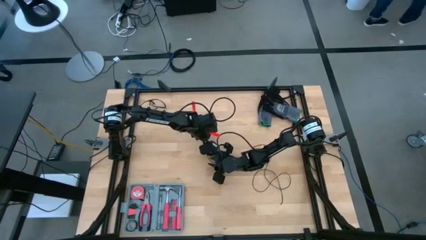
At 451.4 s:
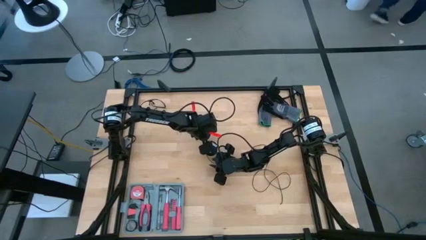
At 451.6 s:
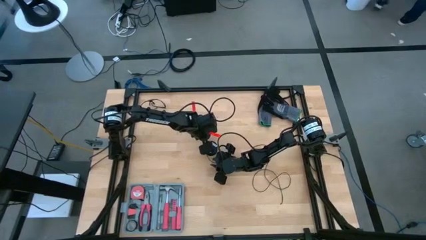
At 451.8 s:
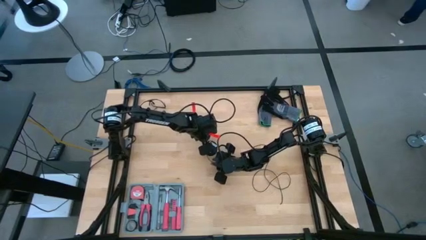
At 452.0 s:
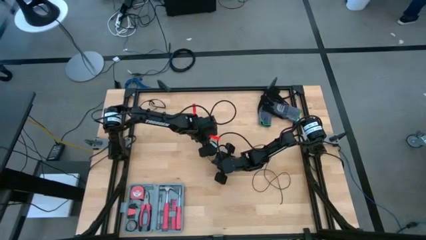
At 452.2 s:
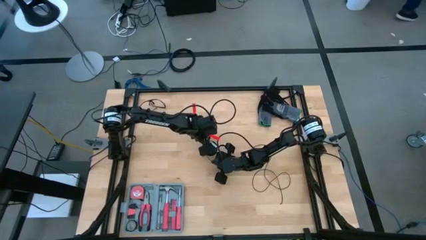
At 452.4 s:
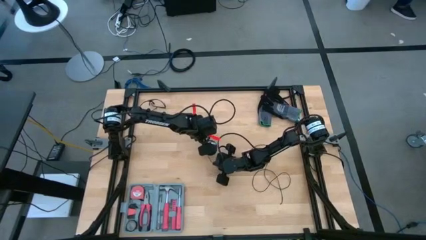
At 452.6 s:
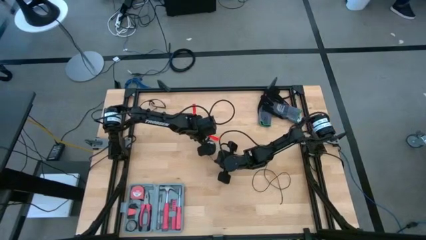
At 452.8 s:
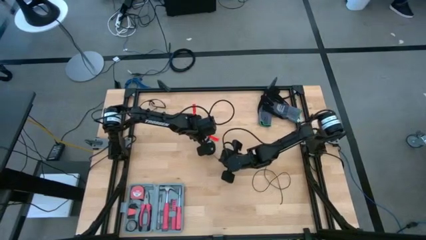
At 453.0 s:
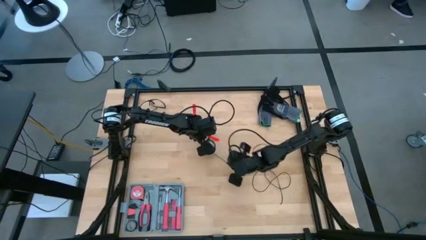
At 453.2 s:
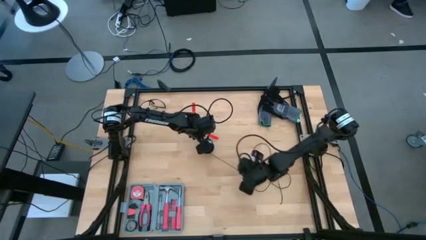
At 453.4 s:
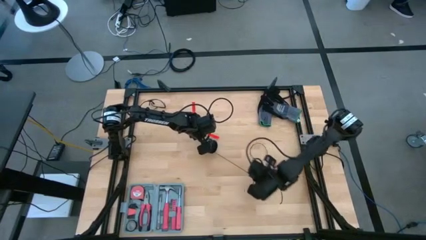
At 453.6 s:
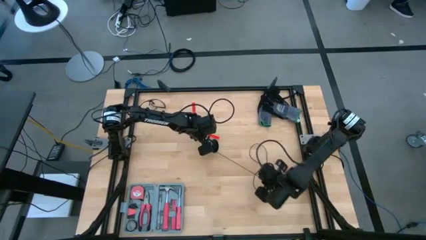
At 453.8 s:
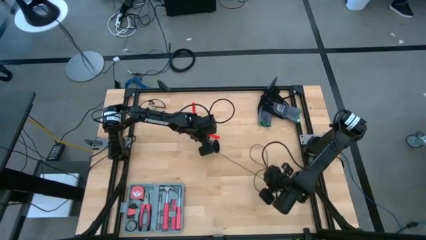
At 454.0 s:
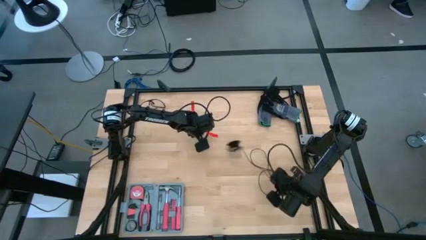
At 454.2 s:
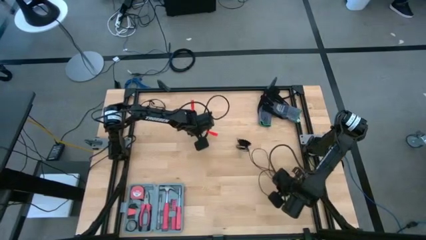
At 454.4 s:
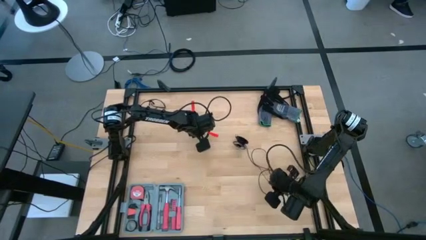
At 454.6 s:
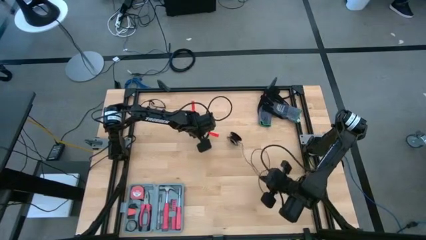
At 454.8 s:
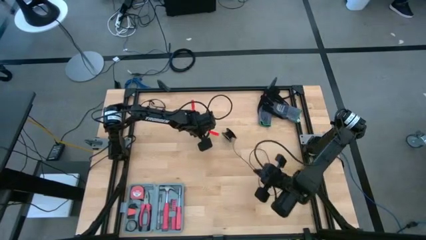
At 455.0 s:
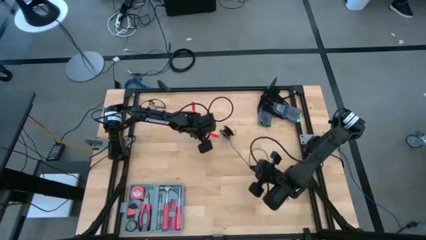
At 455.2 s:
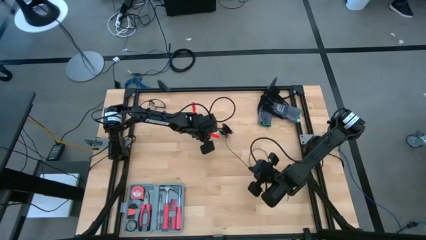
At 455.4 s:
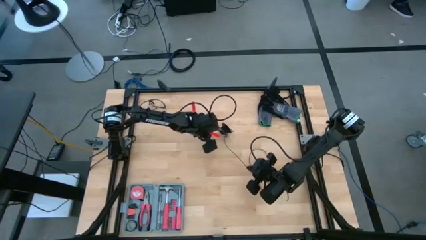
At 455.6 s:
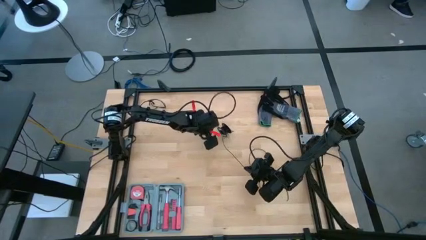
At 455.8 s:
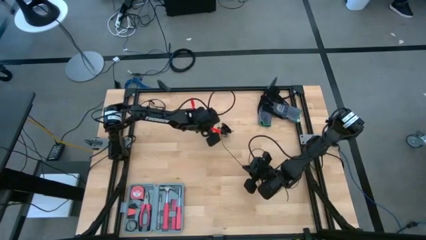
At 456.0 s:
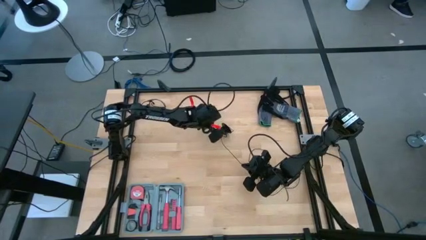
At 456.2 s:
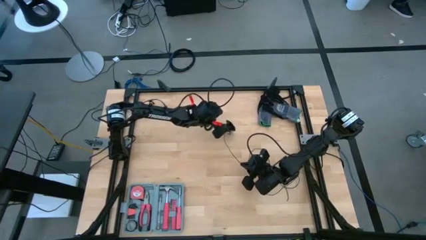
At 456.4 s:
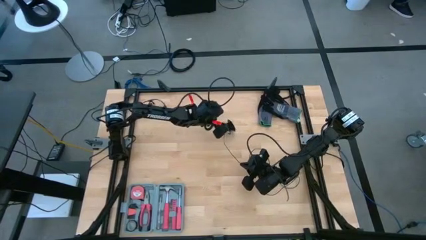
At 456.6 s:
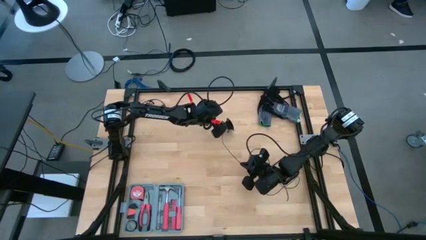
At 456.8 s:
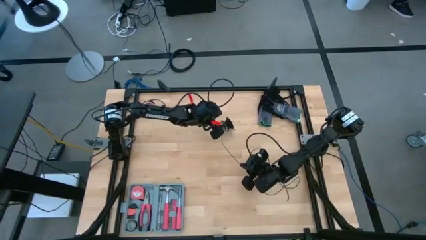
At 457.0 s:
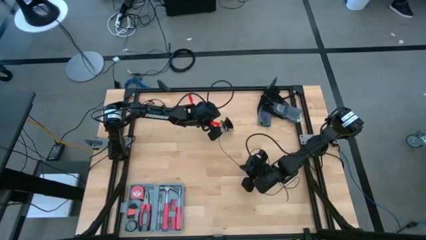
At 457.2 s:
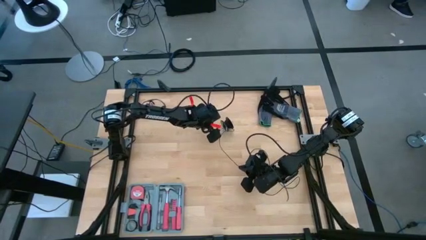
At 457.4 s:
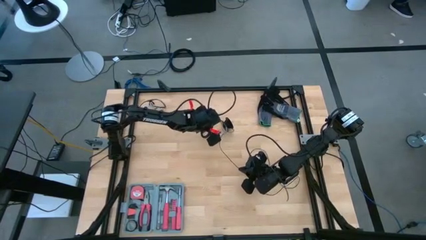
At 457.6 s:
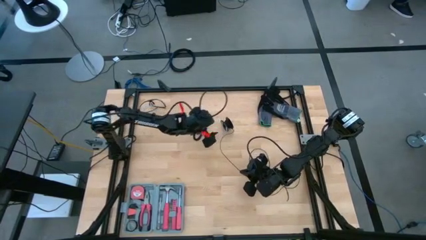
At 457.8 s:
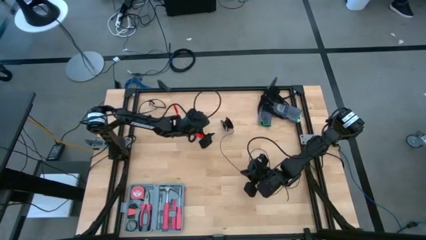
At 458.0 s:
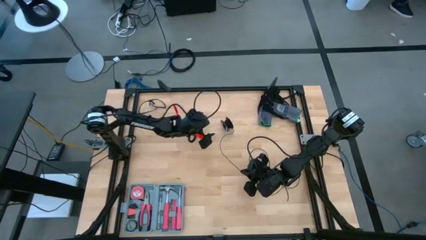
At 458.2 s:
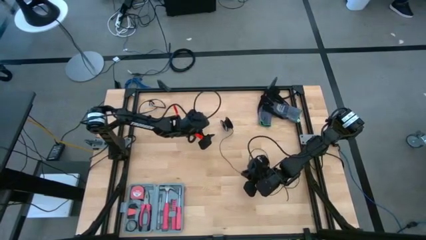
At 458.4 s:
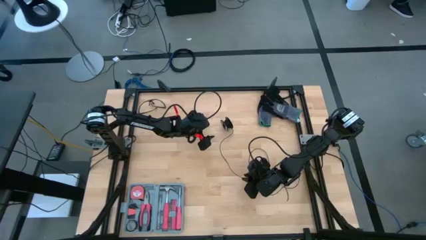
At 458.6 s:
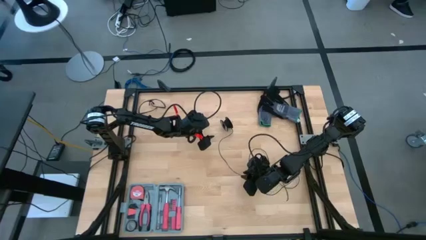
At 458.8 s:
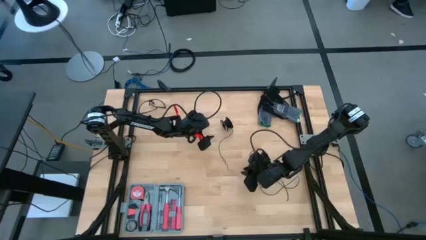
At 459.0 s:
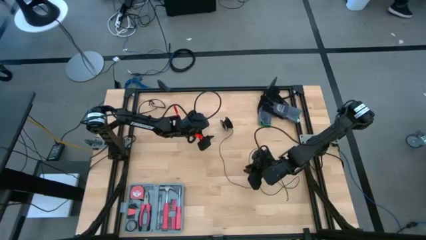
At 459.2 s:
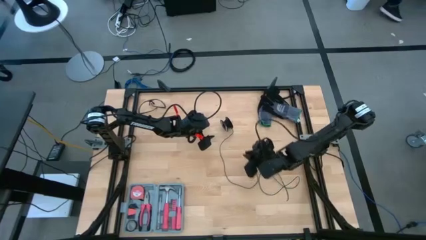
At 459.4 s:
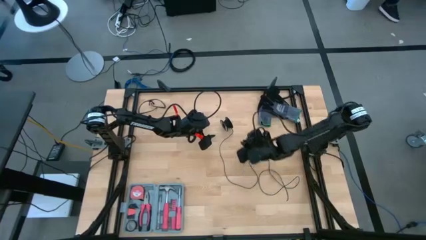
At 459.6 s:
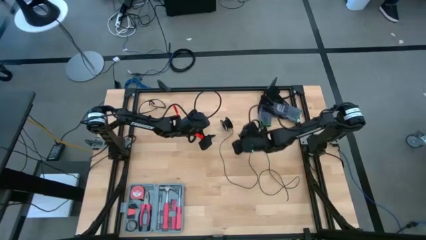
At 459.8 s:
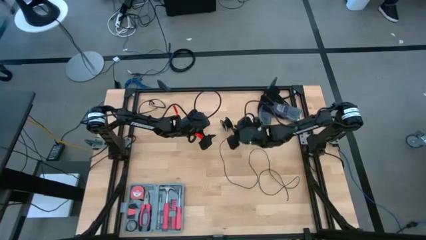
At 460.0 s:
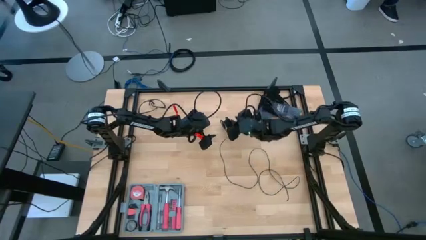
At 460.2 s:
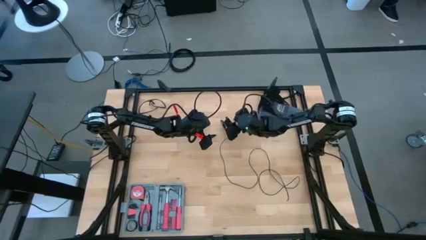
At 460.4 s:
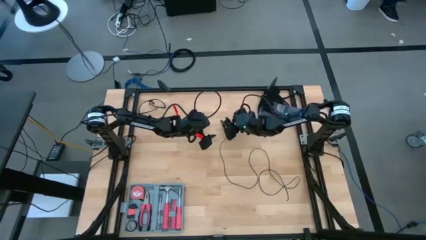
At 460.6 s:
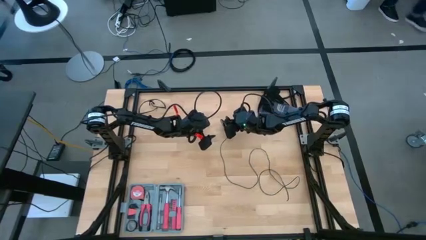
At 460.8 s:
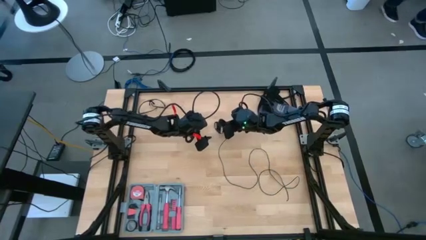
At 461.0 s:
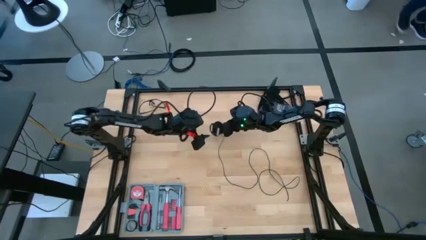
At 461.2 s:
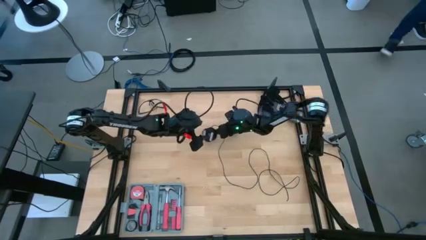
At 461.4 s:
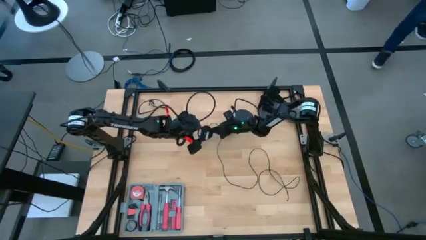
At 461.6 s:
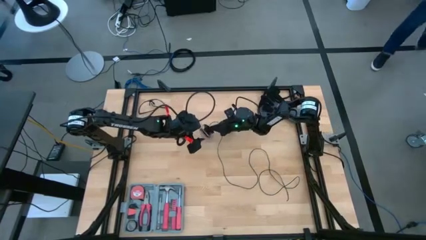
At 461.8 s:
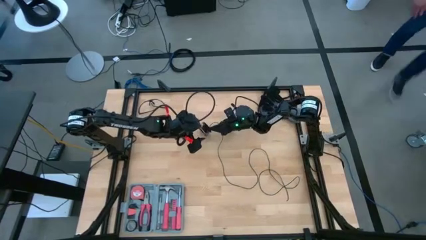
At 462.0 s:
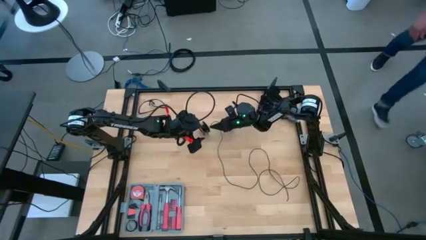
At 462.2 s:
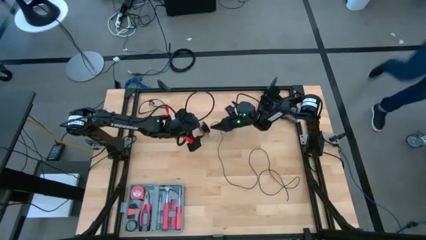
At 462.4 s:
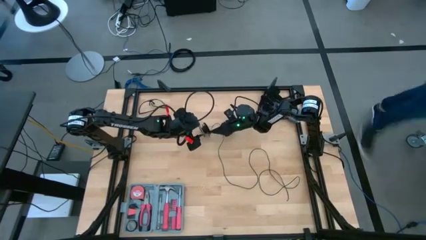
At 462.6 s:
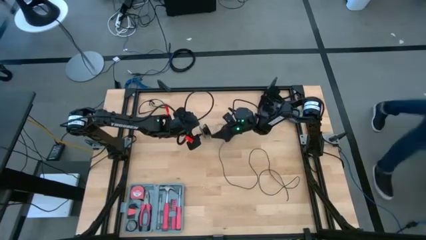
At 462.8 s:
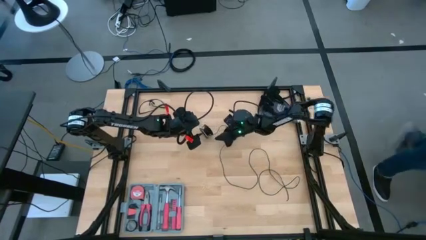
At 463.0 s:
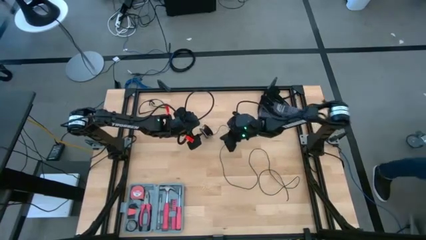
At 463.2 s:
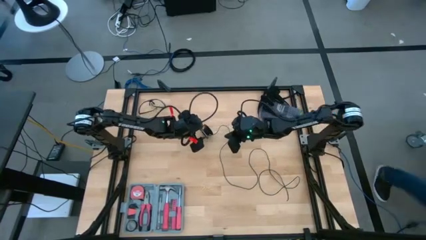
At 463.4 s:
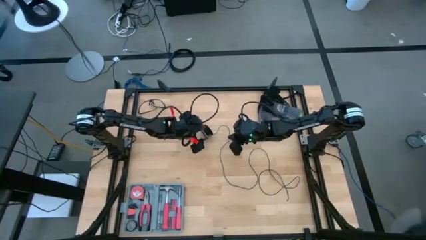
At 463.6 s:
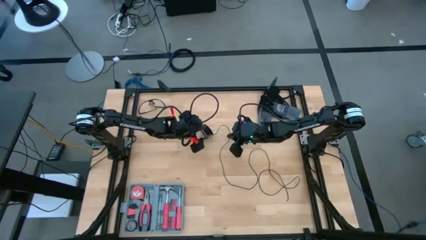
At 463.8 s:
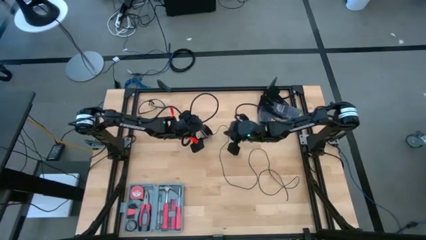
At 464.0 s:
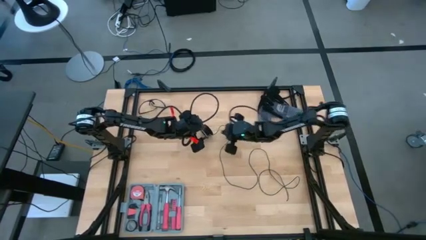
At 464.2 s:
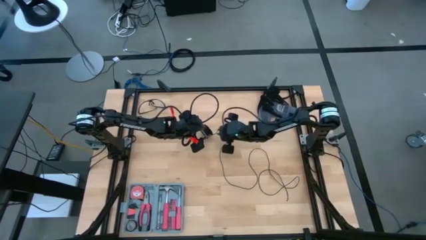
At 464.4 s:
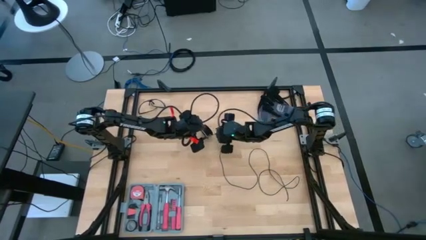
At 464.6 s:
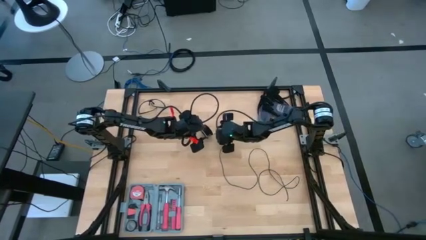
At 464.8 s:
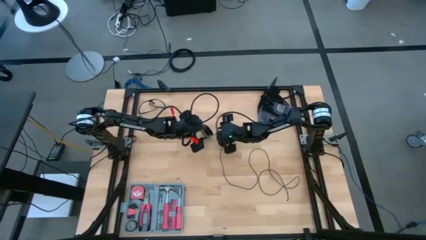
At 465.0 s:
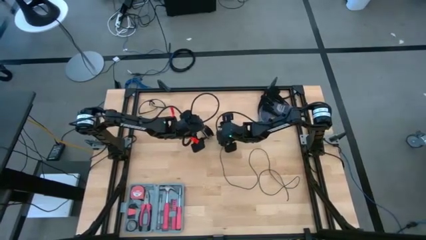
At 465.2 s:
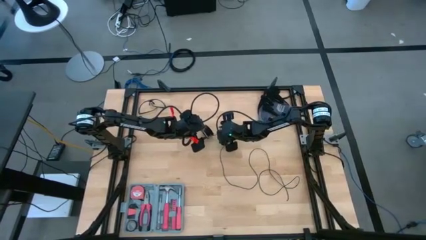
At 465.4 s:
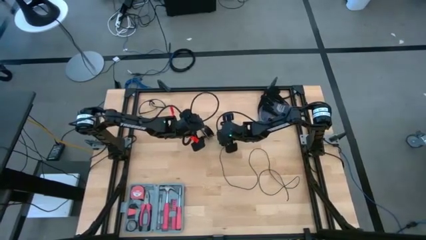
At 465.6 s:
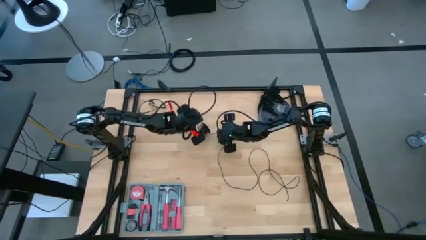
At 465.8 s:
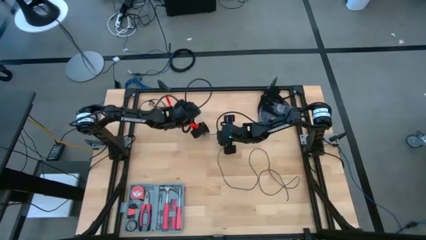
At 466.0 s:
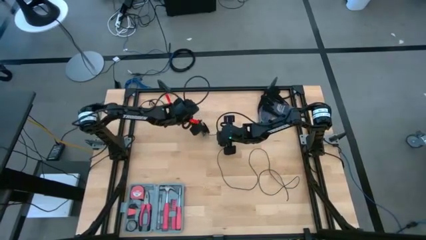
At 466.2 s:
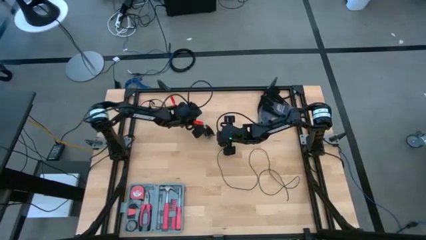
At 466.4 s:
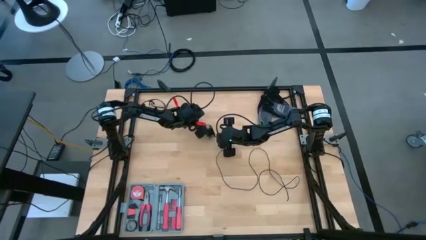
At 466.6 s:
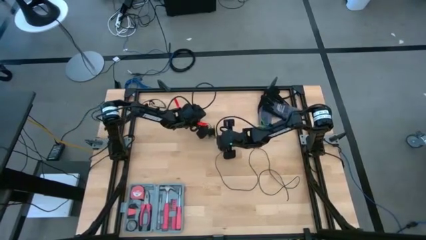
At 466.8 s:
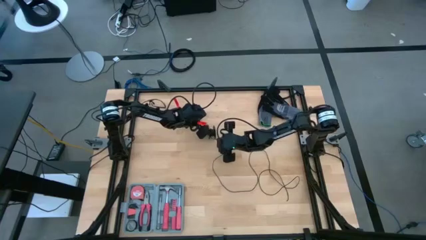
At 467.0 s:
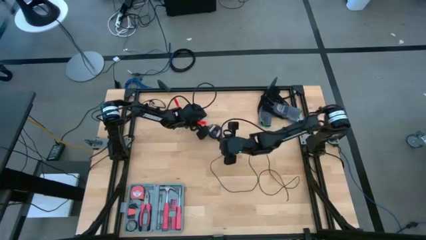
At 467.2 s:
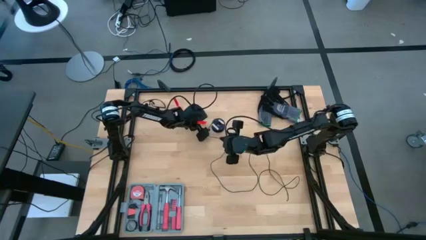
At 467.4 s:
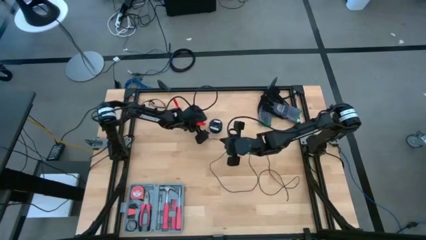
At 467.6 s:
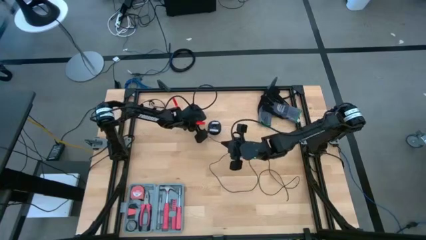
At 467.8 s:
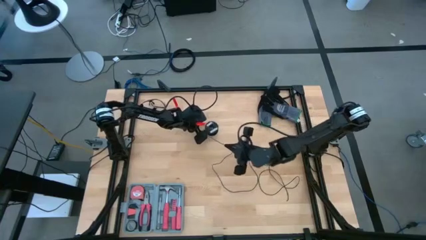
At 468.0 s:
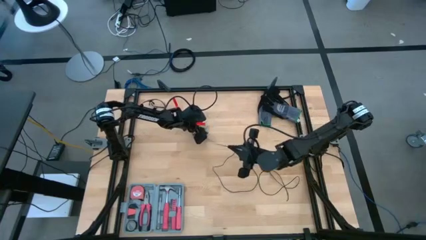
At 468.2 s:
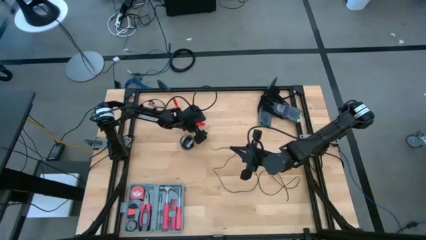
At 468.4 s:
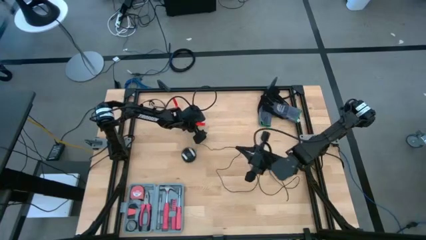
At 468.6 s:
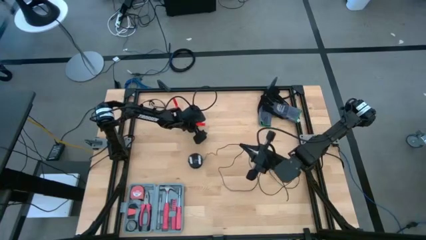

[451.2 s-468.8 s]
Task: Coil cords
Uncoil the black wire from the black spool
